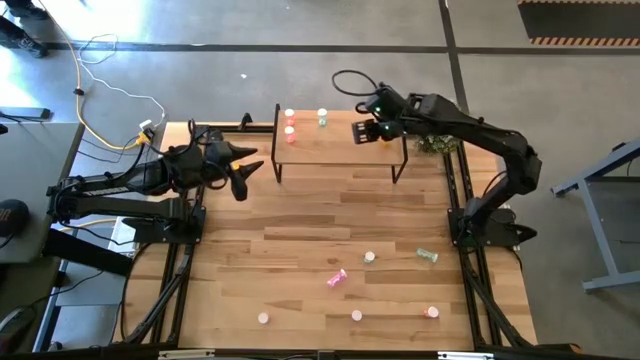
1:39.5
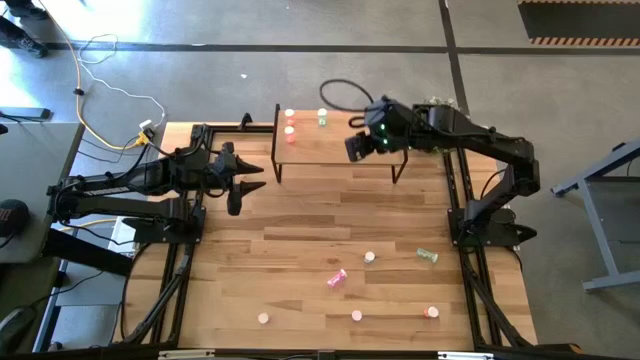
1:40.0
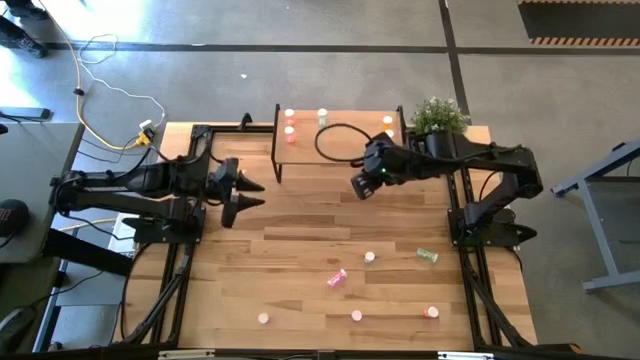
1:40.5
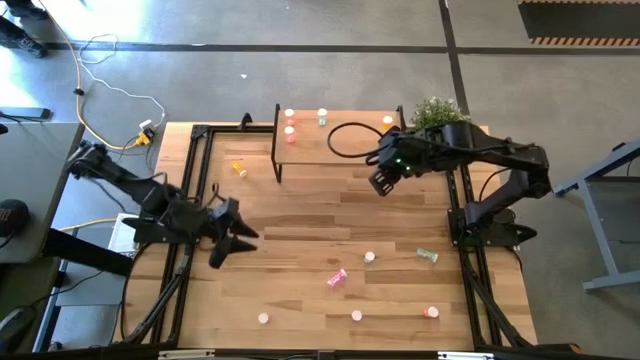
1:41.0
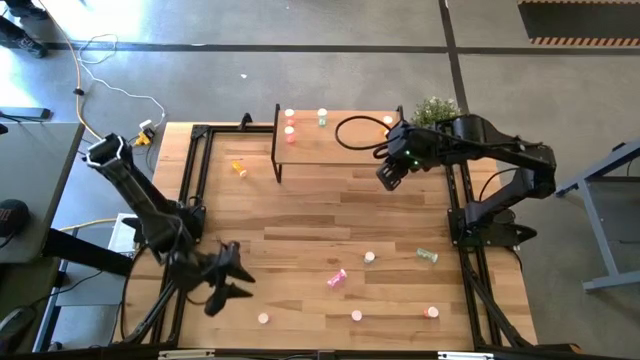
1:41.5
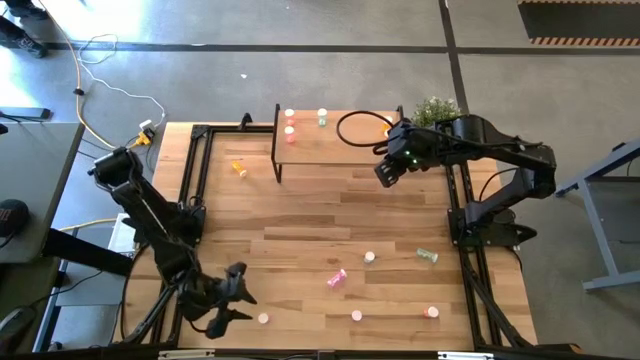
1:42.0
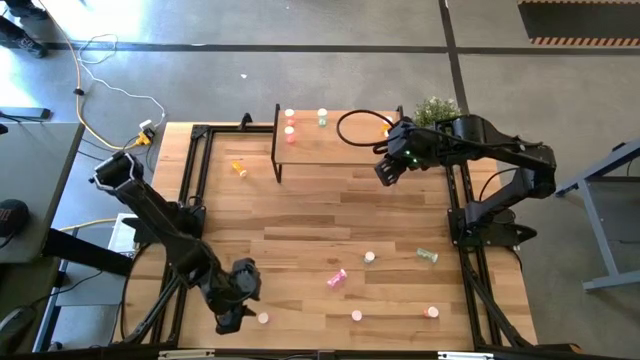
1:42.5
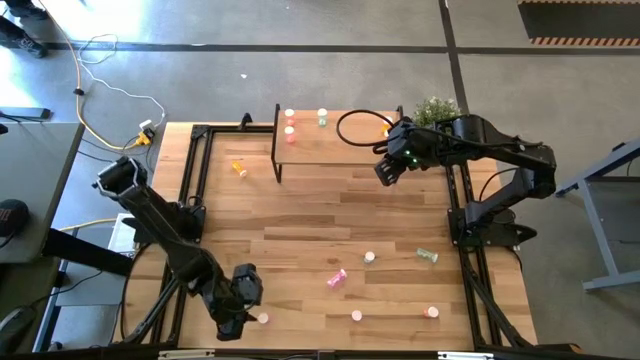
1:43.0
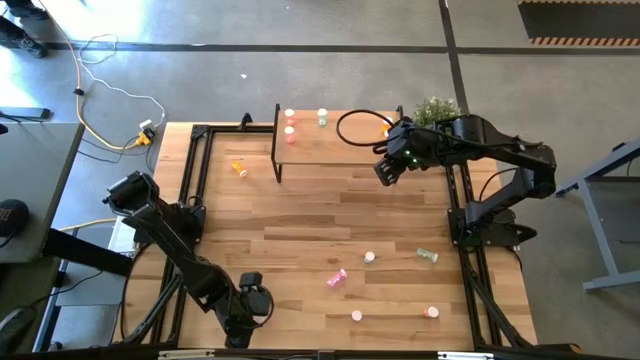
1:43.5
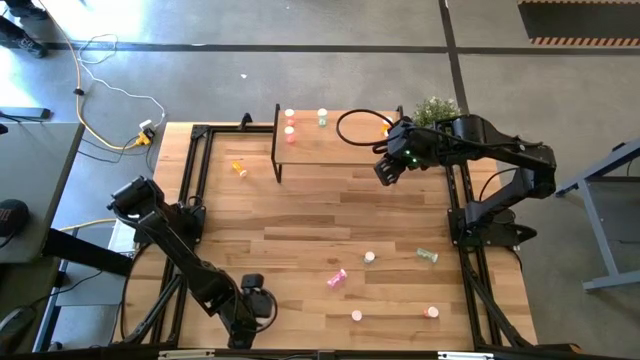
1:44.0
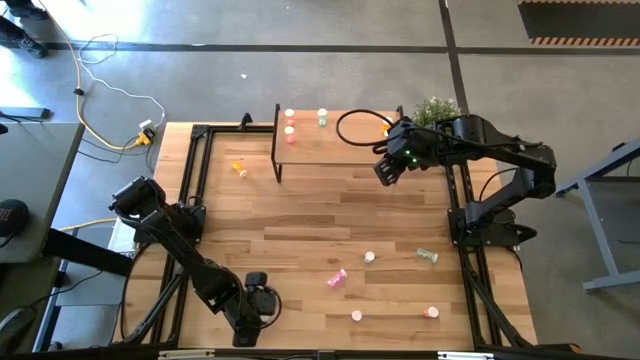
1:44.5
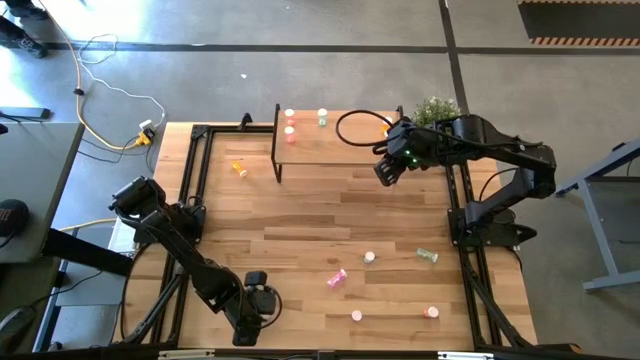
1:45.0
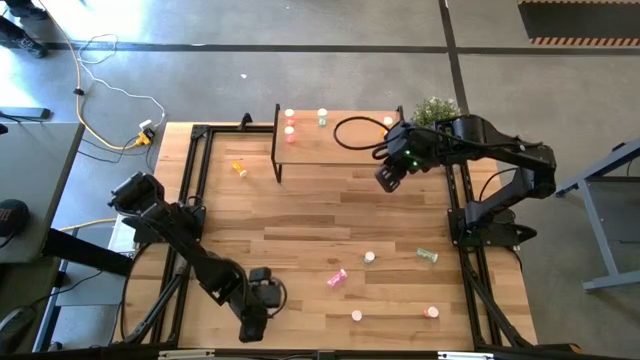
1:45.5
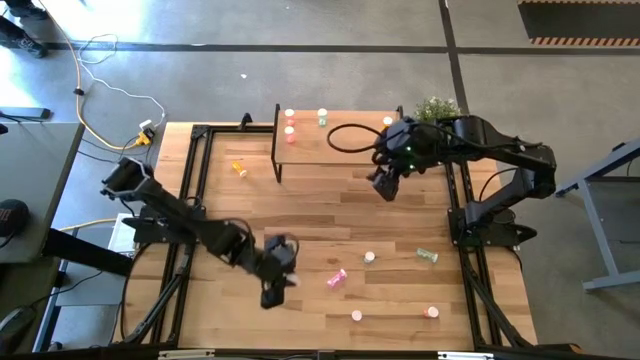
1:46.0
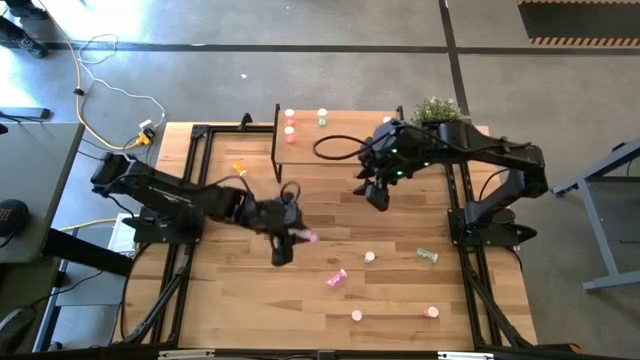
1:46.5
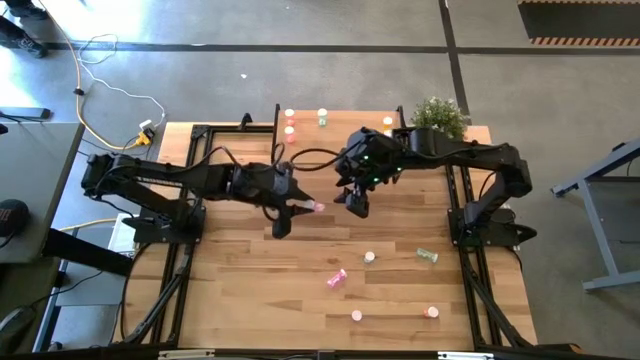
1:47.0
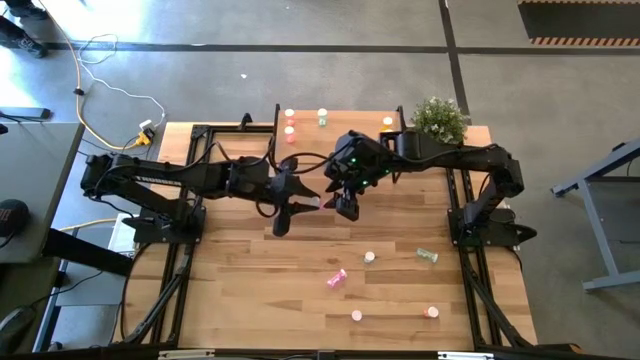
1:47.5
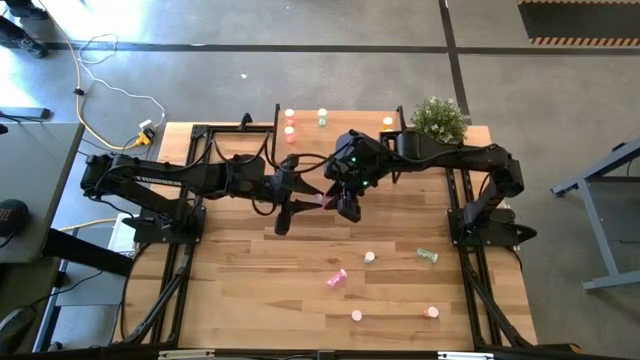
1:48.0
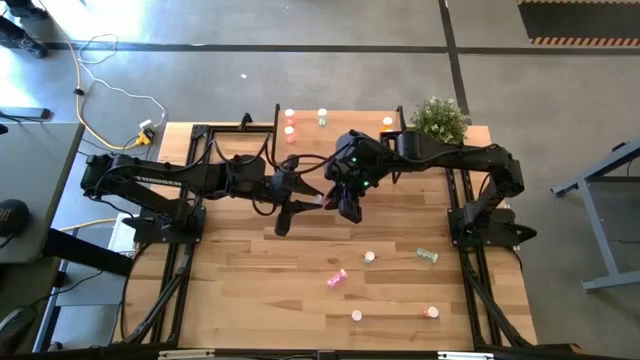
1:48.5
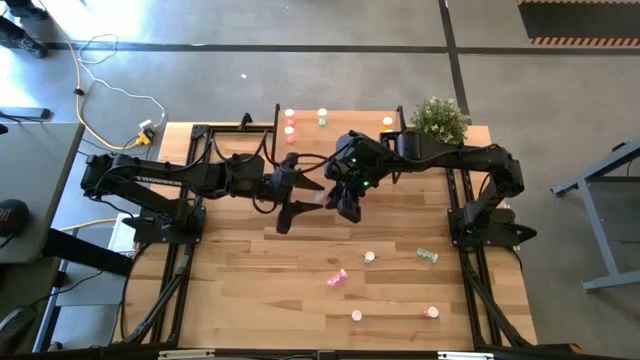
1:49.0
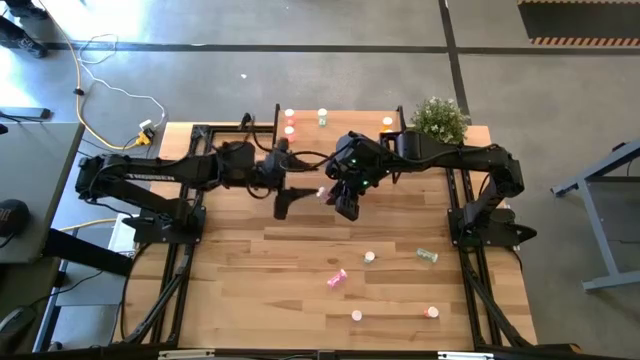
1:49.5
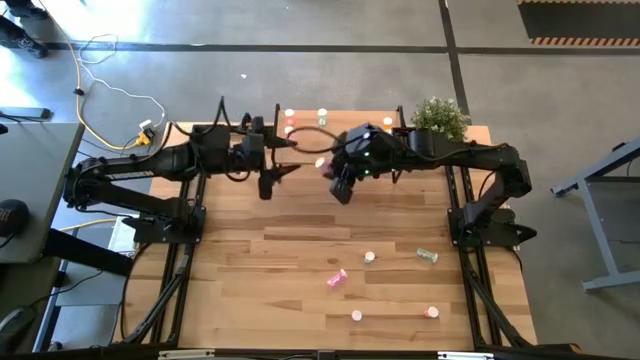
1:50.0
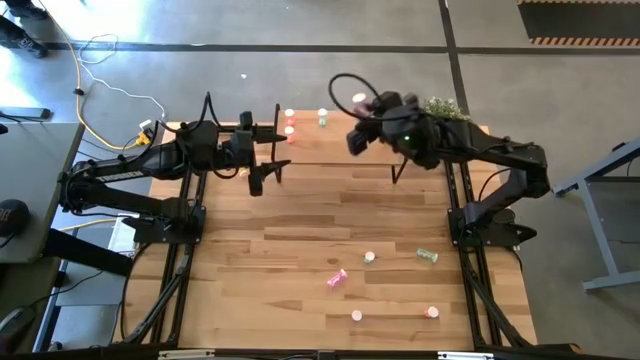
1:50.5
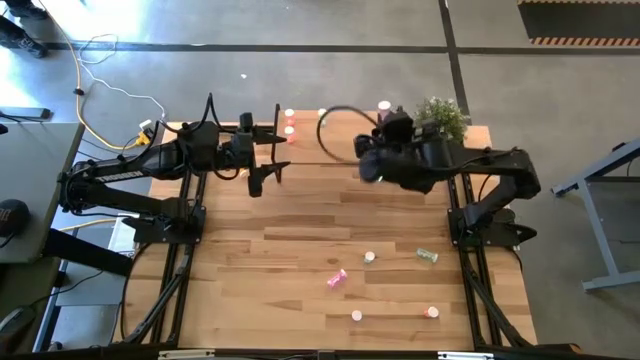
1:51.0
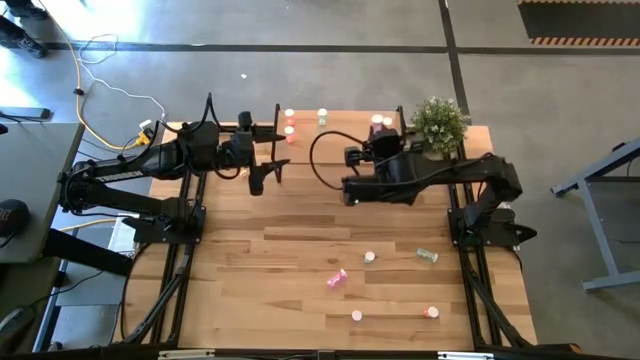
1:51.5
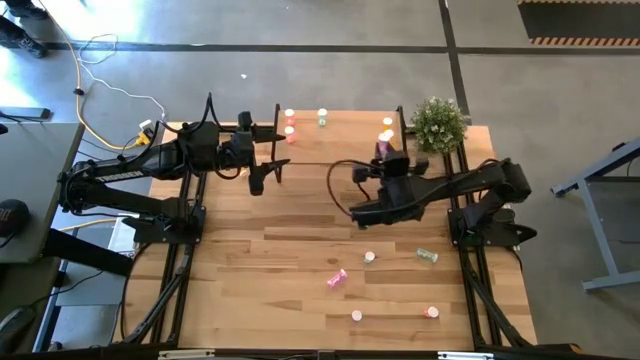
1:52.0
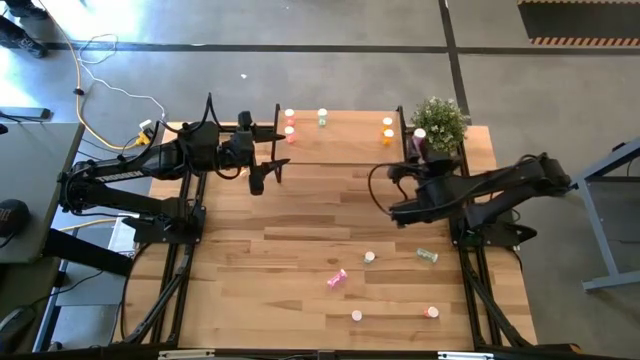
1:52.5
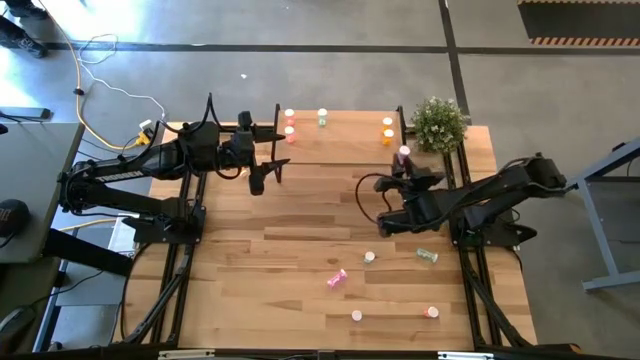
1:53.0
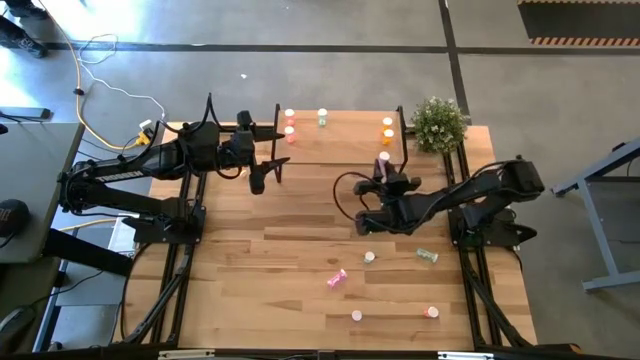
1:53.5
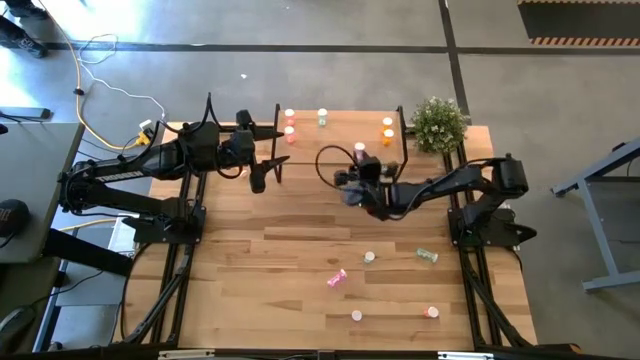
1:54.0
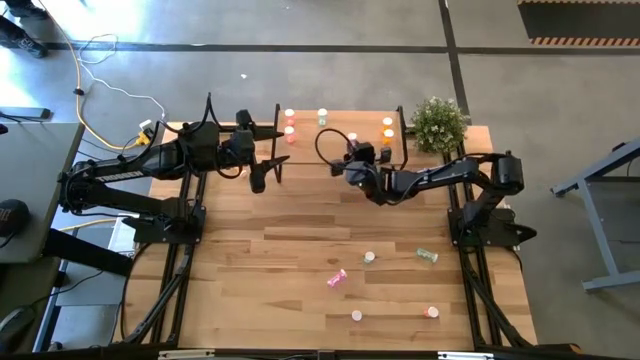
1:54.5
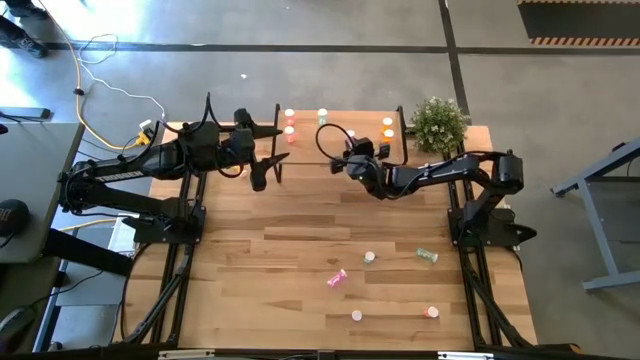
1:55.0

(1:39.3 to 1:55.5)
Task: Pick and place medicine bottles onto shelf by color
Put the bottom left purple pill bottle on the shelf

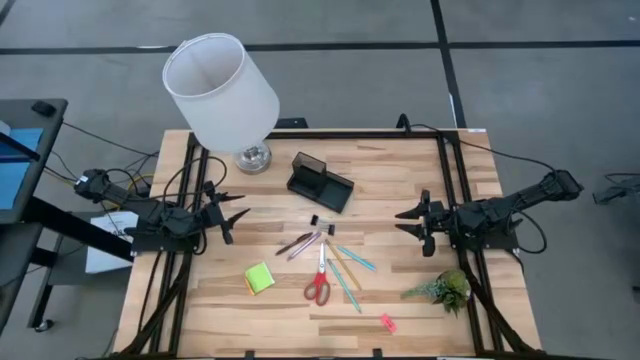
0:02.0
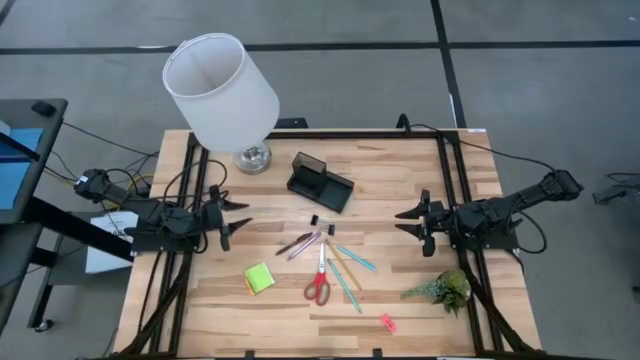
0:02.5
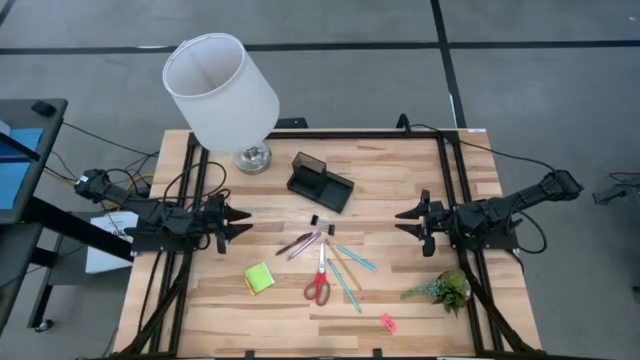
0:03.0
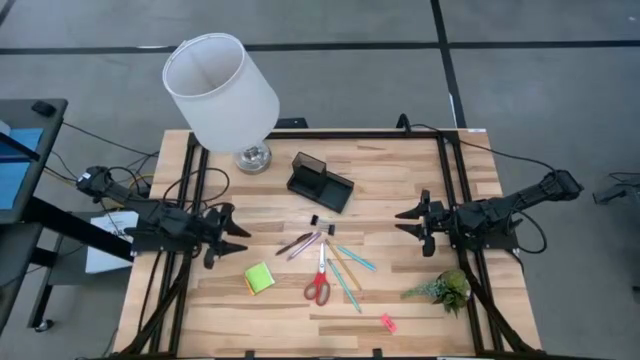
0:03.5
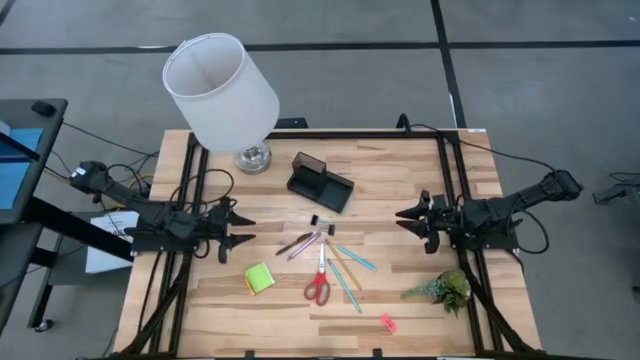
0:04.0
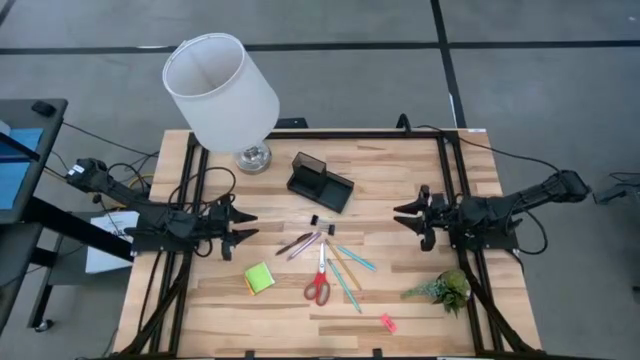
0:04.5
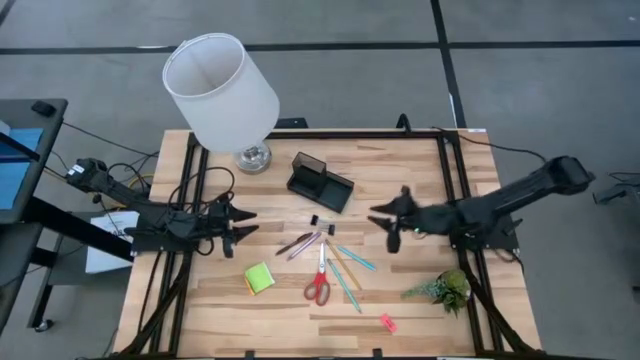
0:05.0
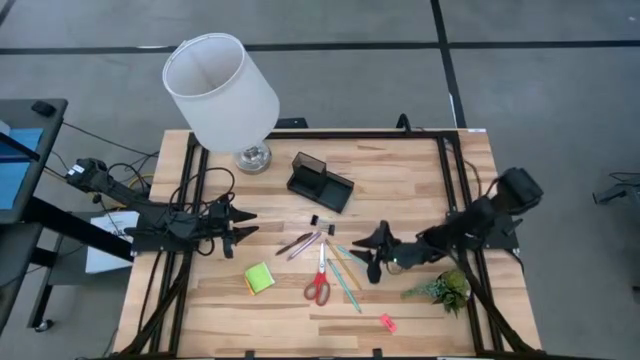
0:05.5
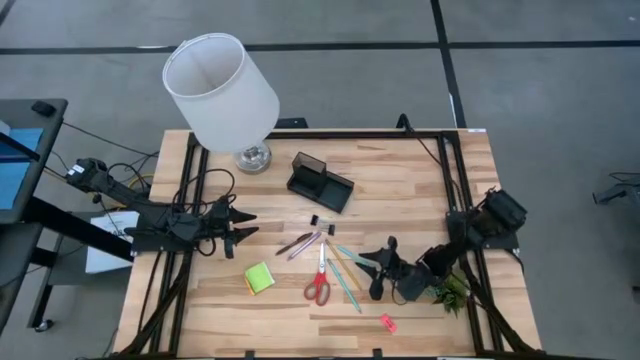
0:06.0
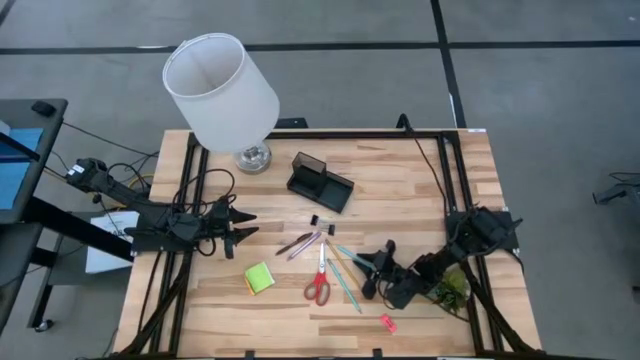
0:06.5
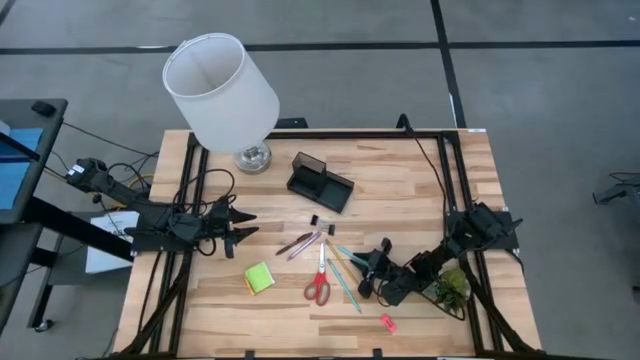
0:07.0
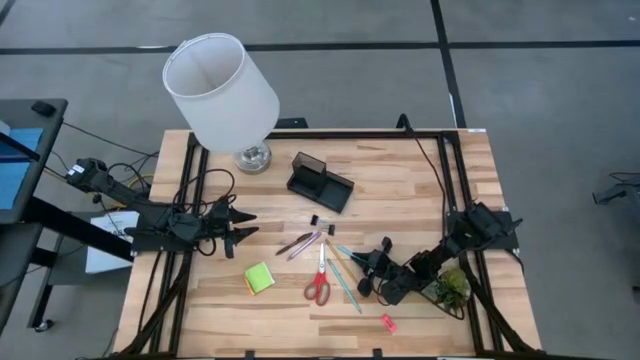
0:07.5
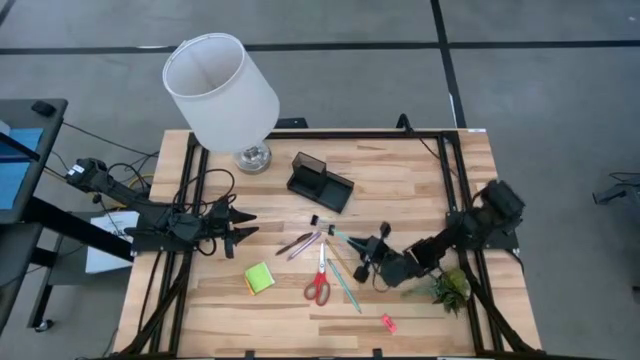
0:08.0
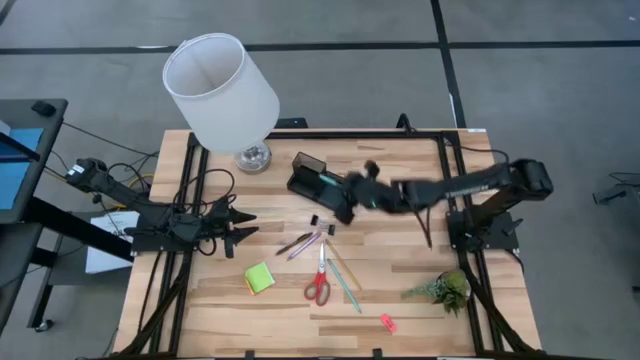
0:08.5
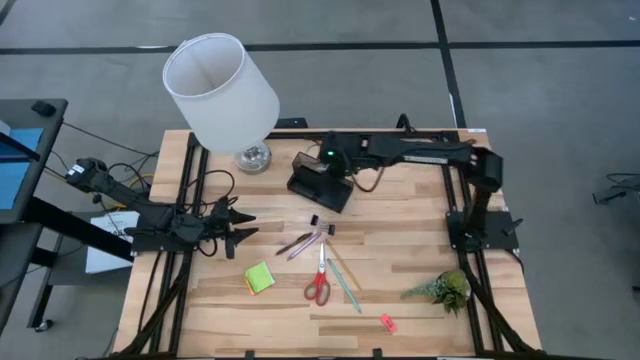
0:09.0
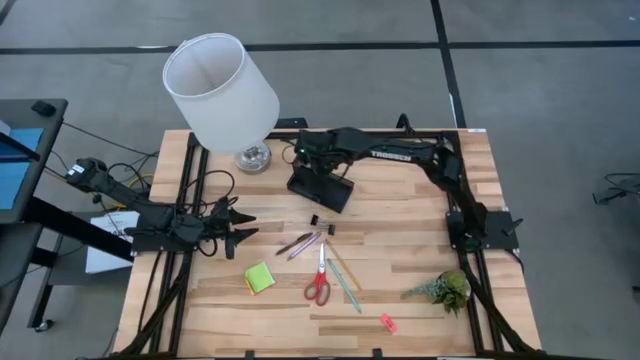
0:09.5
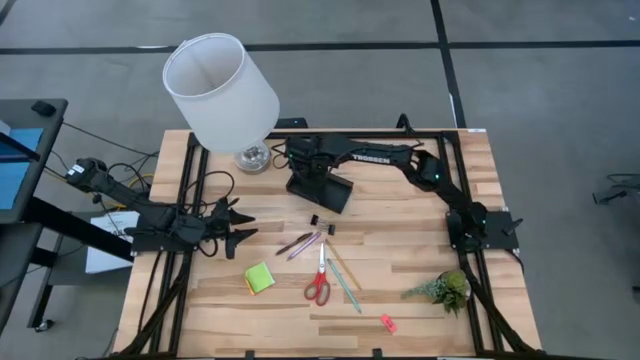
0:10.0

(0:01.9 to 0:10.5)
Task: Pick and place office supplies into organizer
Put the light blue pen into the black desk organizer
